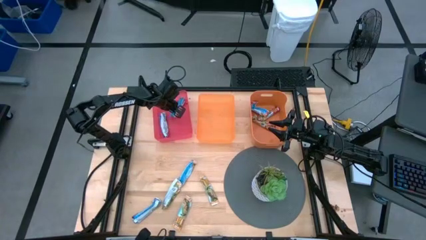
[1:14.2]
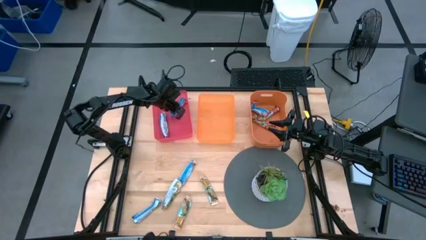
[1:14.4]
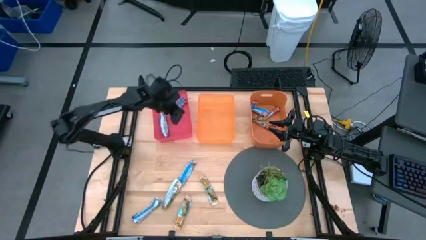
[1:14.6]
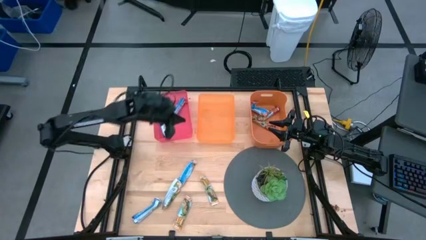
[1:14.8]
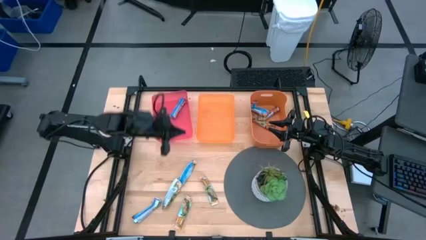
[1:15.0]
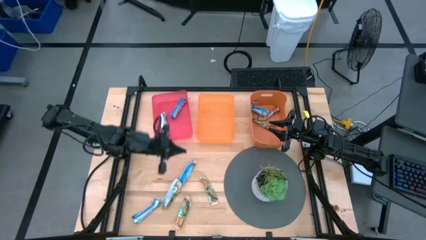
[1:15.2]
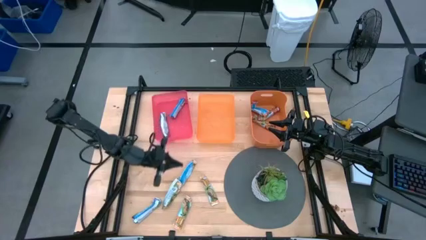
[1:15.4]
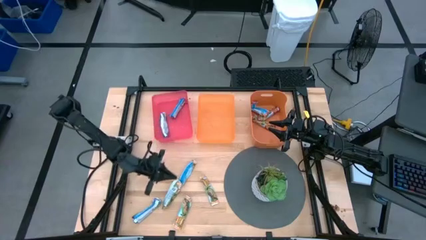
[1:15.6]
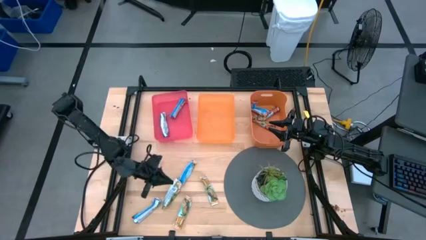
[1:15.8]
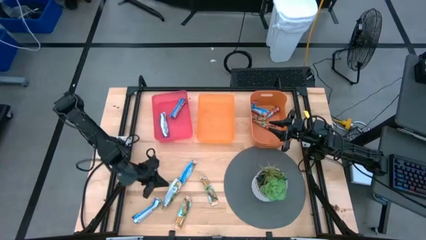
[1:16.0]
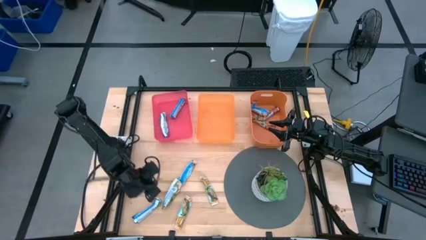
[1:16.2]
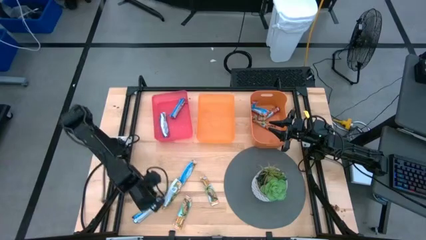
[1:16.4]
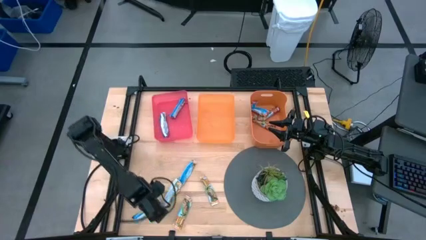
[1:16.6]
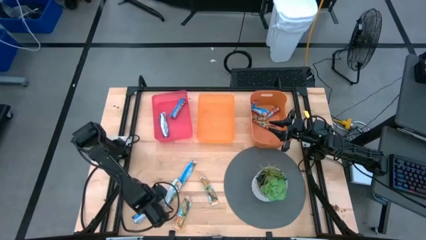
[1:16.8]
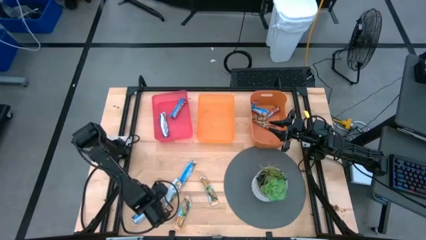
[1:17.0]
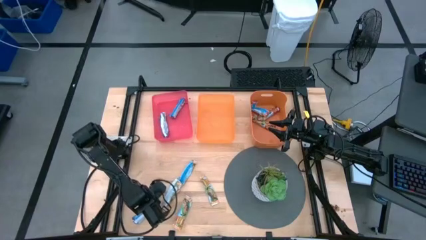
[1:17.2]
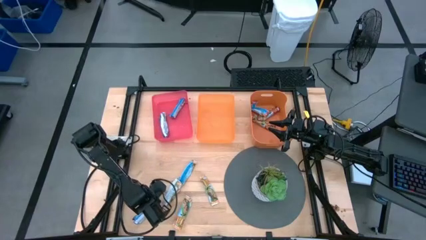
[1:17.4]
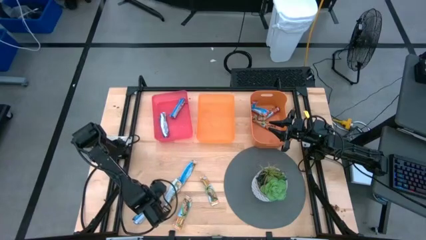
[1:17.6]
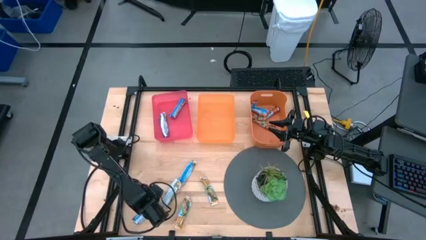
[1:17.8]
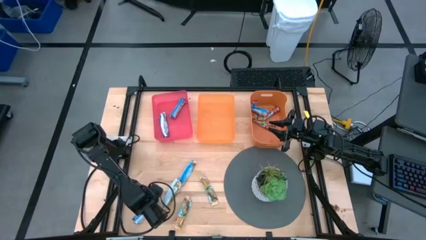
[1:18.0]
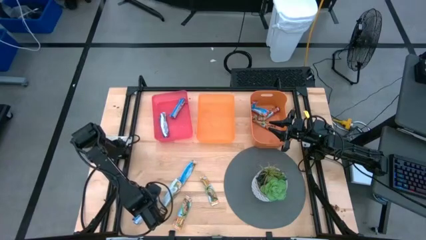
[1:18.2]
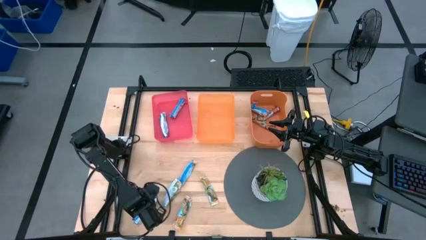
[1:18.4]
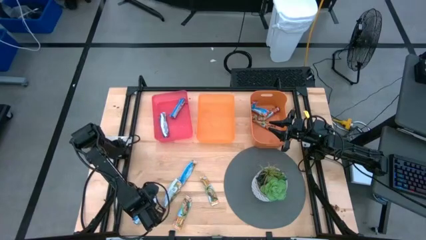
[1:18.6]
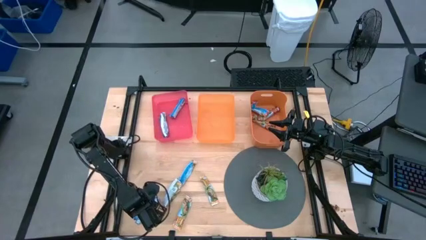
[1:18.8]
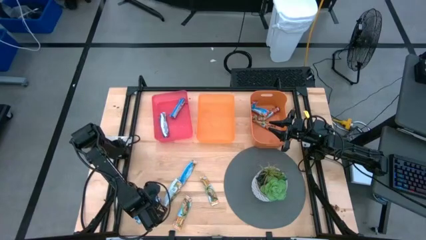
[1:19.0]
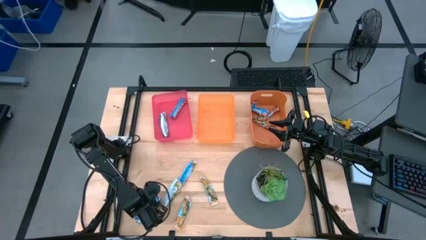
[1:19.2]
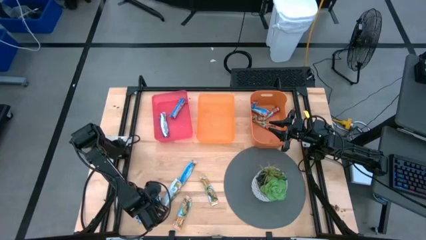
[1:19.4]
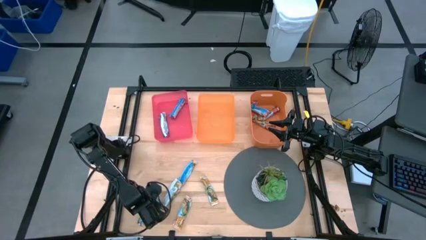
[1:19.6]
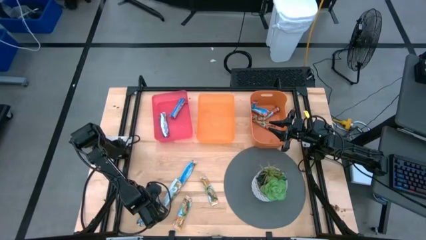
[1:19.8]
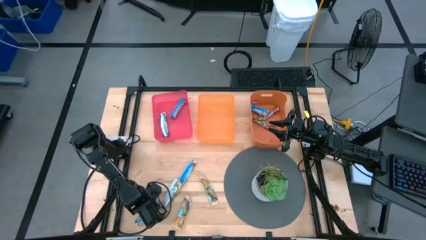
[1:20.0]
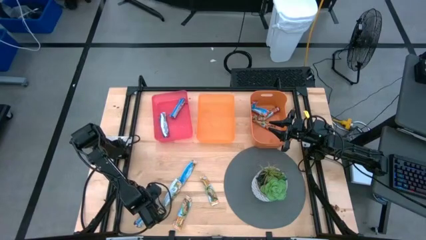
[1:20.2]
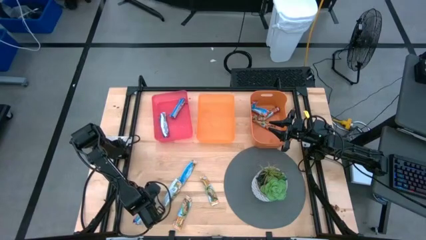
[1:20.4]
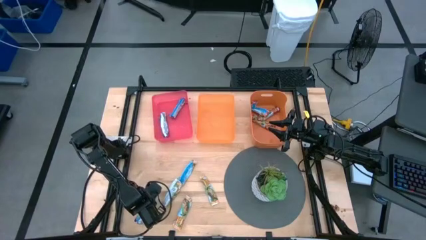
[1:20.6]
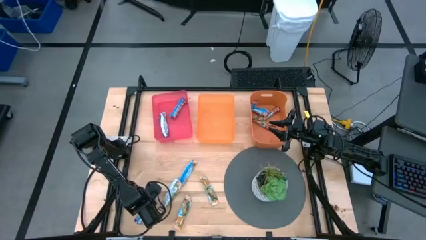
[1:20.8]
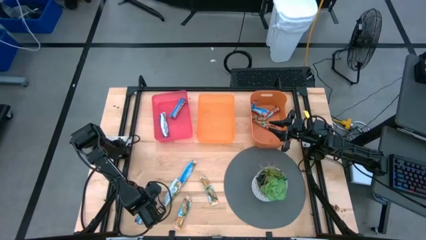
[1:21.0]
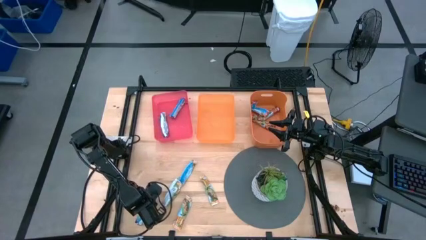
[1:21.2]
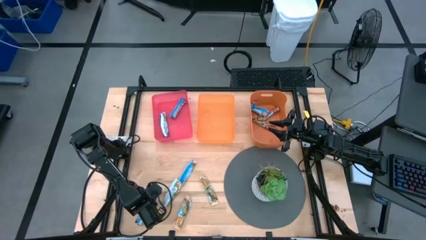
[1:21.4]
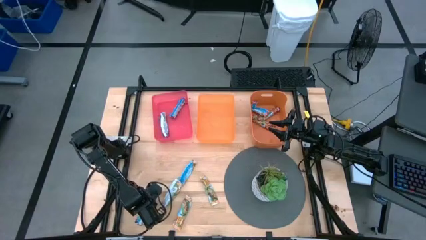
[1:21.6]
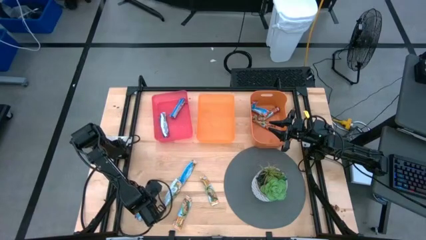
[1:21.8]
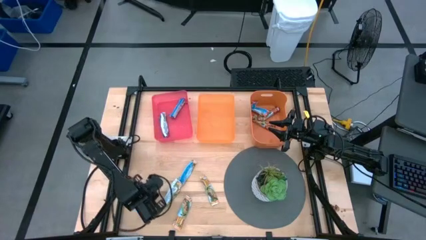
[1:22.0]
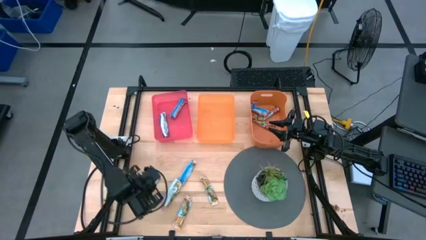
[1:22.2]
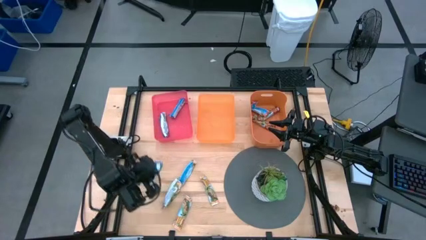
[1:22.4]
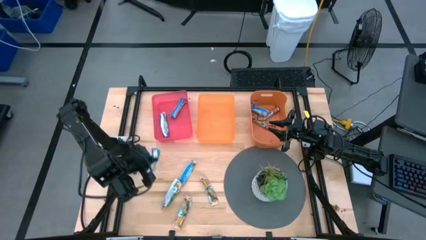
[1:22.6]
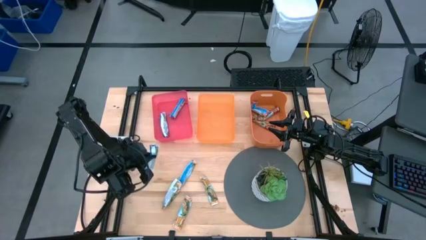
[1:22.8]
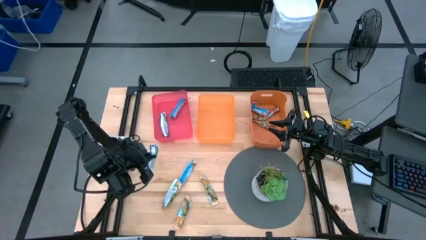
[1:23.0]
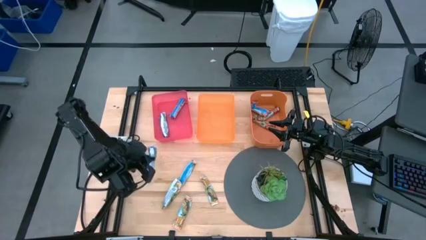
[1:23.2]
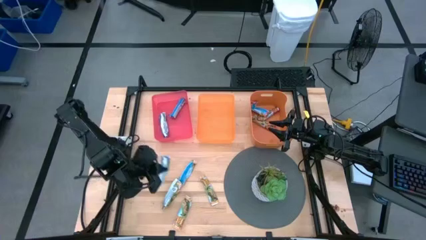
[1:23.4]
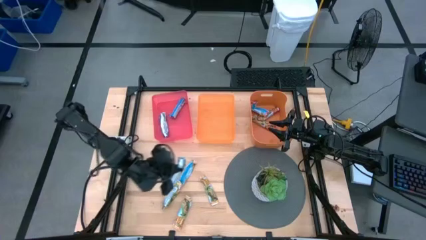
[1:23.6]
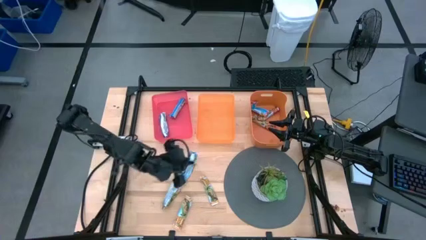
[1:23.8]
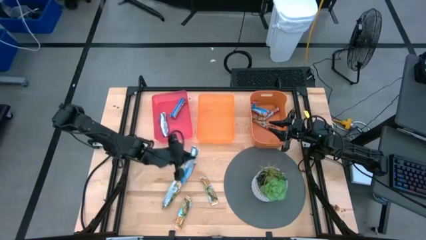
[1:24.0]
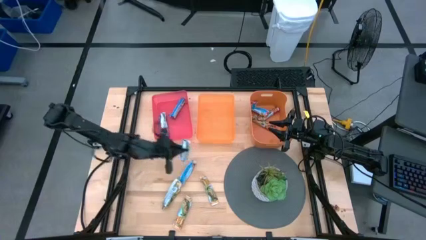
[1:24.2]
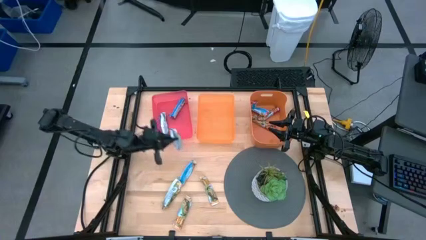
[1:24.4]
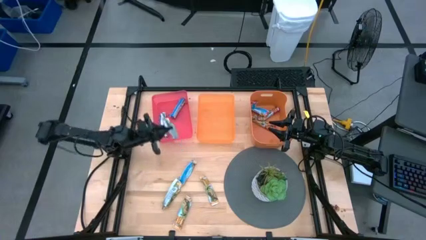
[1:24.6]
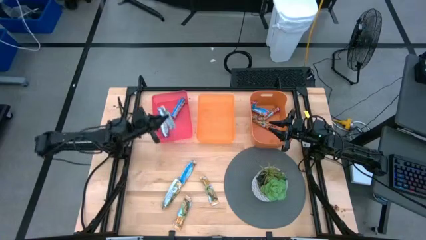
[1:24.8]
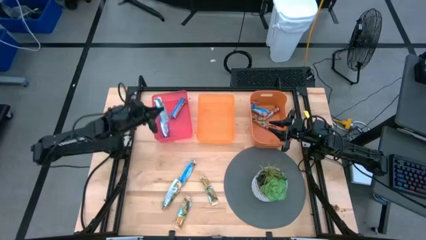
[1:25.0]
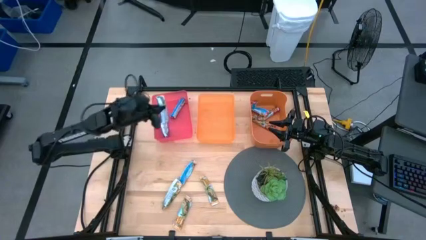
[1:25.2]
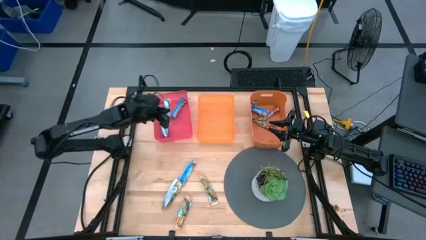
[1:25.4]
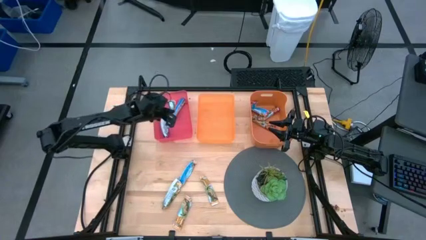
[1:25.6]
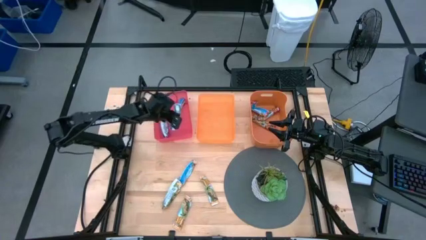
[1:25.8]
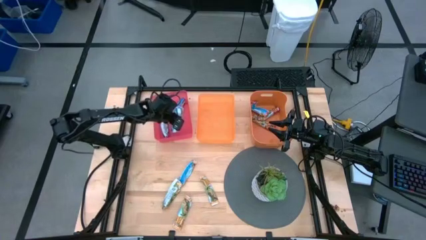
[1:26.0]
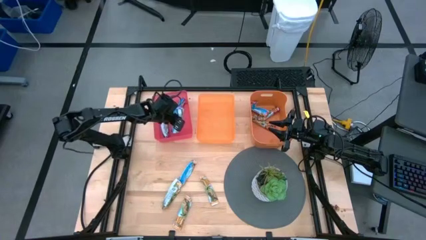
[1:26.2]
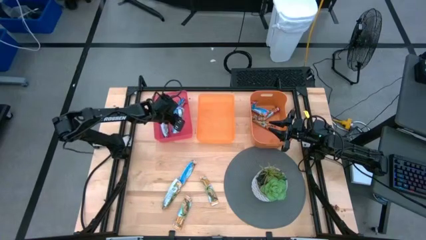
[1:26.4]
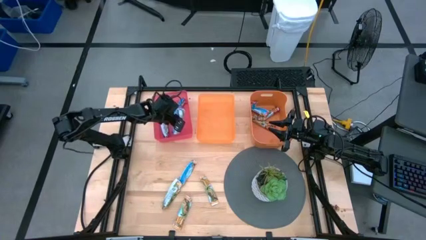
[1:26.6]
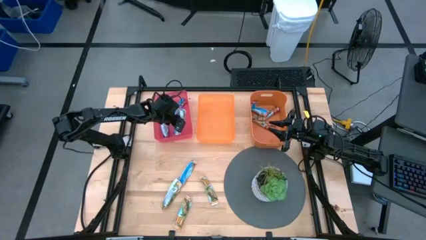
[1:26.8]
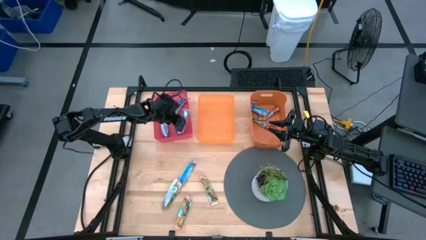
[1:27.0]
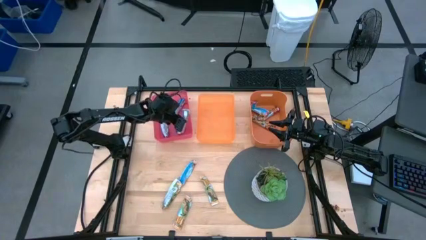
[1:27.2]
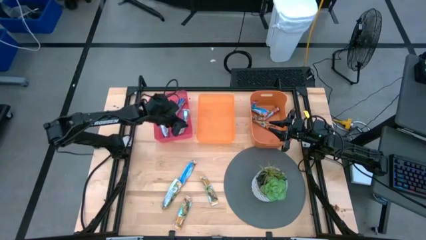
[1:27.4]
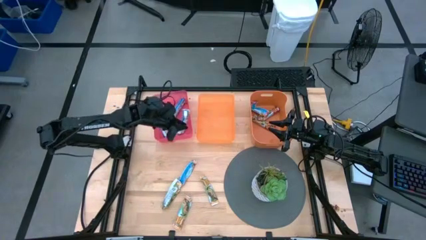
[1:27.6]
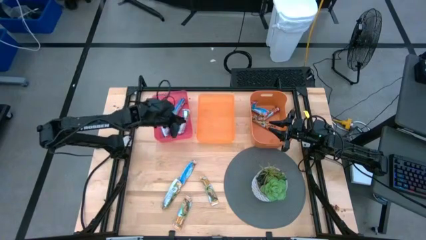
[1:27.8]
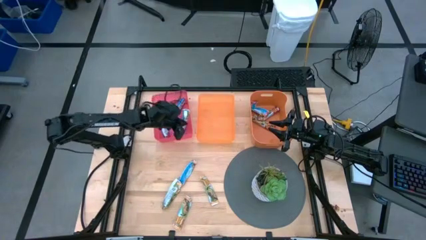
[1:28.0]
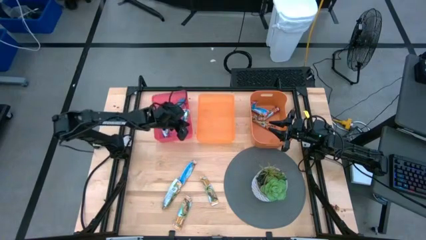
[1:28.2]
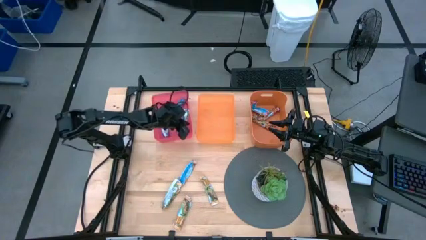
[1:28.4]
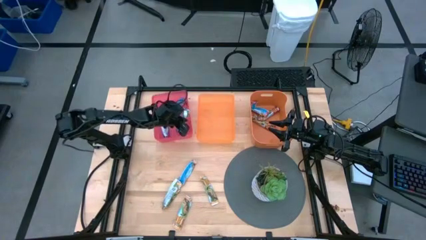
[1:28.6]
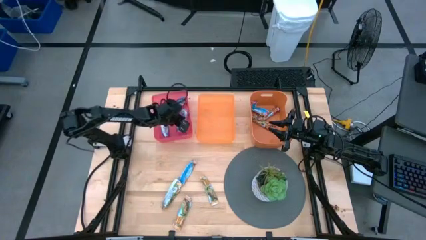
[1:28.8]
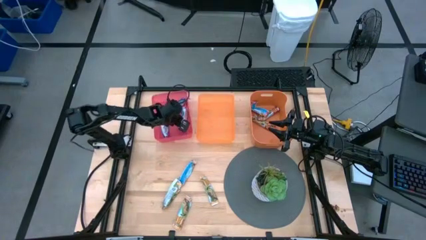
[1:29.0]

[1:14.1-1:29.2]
Task: Pick and place Granola Bars by type
Put the blue granola bar into the pink bin
